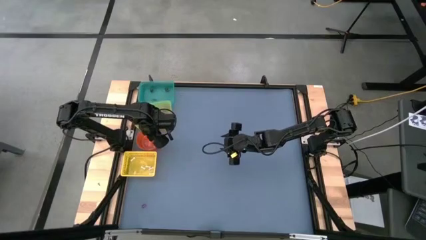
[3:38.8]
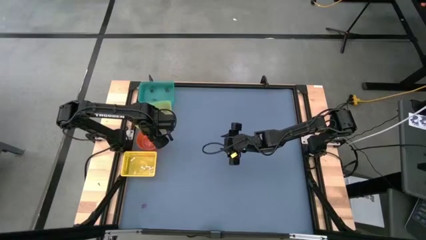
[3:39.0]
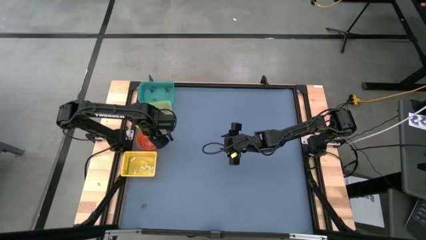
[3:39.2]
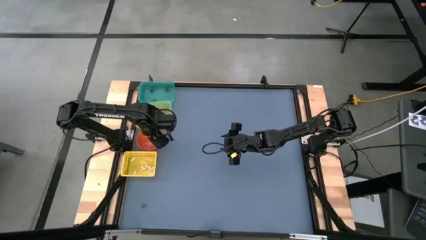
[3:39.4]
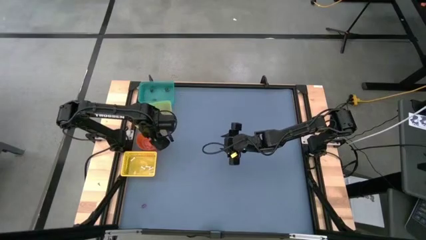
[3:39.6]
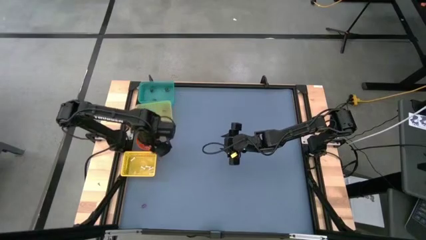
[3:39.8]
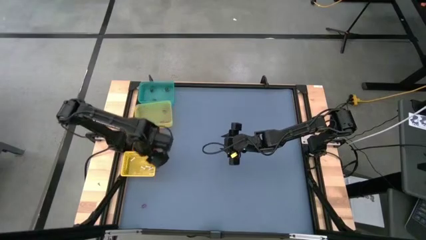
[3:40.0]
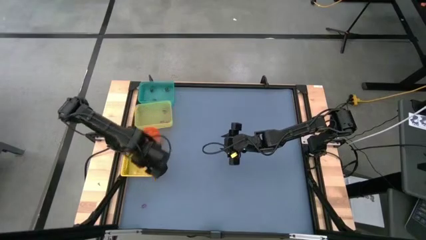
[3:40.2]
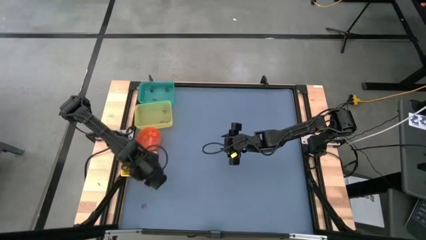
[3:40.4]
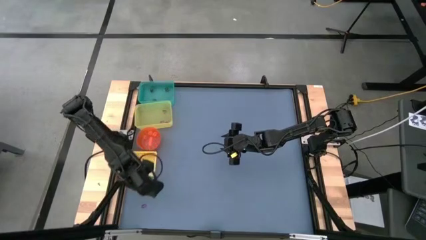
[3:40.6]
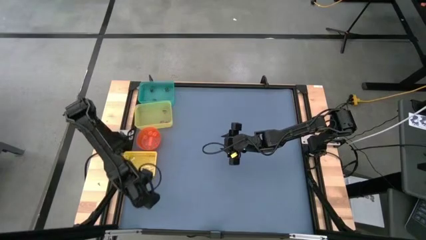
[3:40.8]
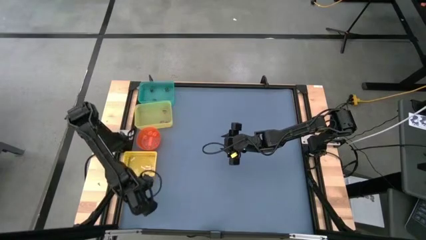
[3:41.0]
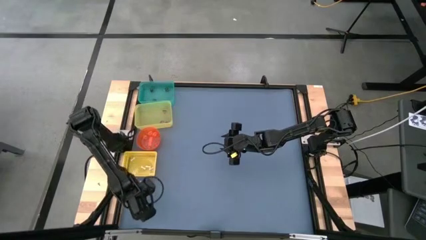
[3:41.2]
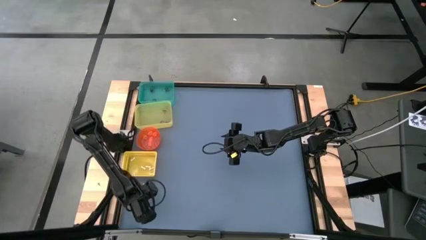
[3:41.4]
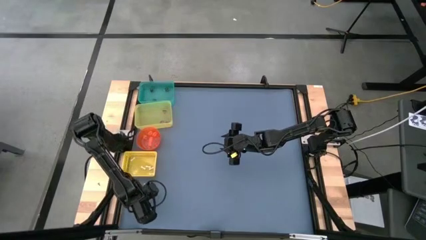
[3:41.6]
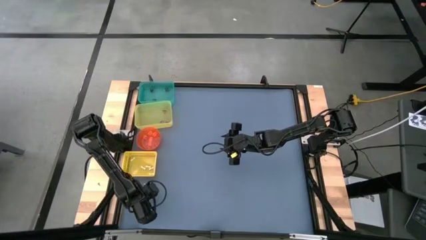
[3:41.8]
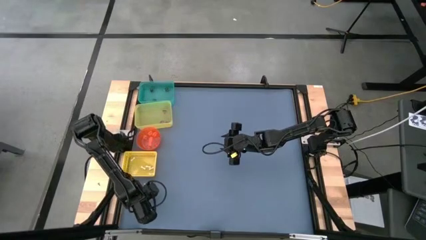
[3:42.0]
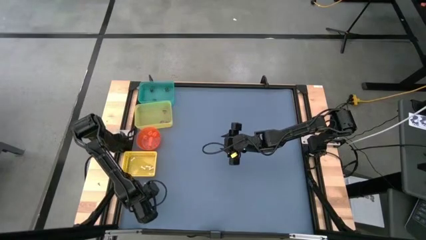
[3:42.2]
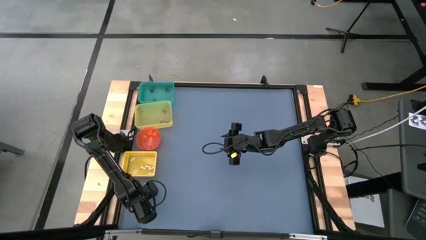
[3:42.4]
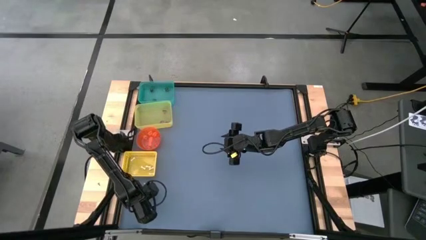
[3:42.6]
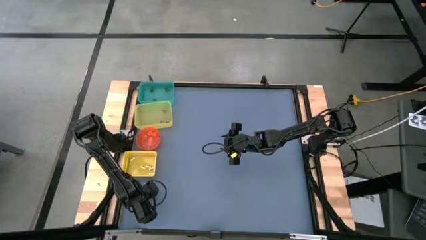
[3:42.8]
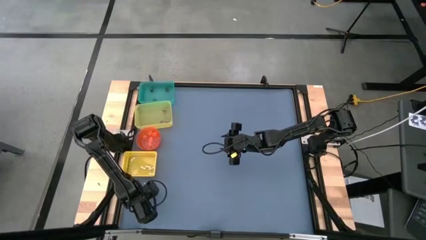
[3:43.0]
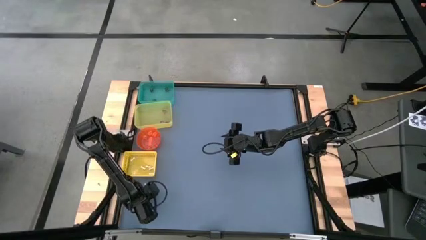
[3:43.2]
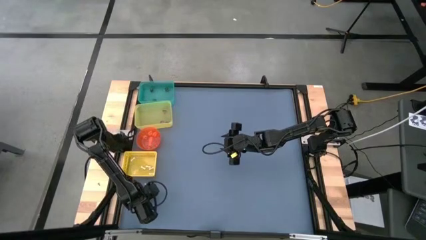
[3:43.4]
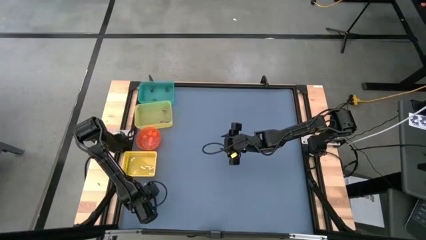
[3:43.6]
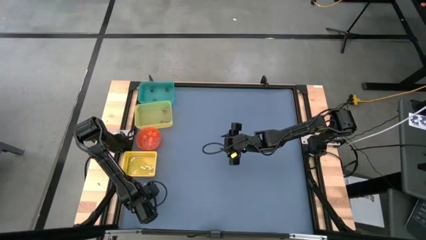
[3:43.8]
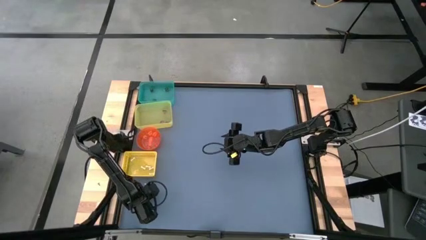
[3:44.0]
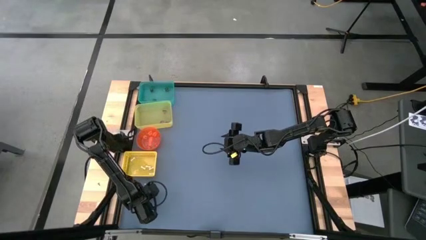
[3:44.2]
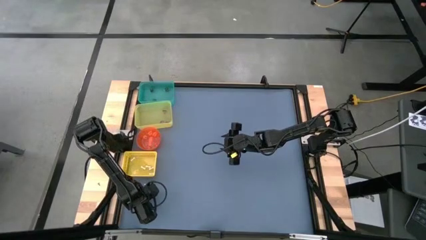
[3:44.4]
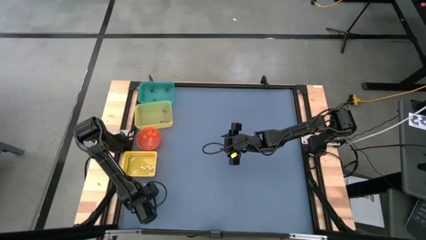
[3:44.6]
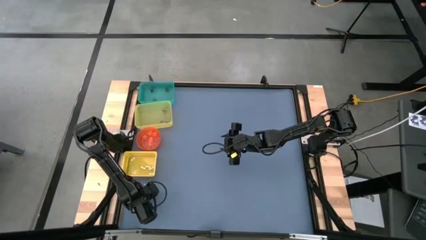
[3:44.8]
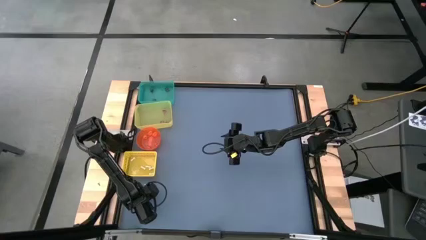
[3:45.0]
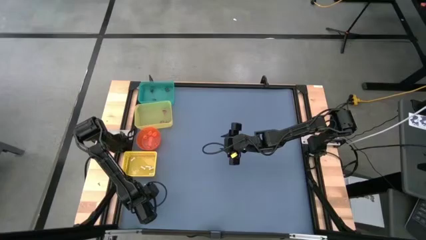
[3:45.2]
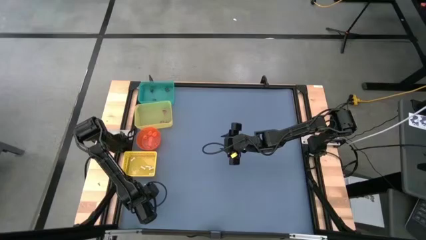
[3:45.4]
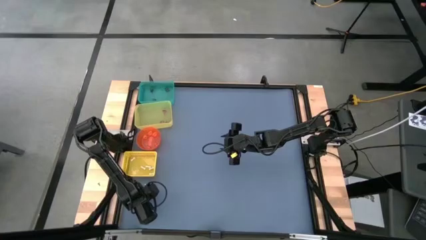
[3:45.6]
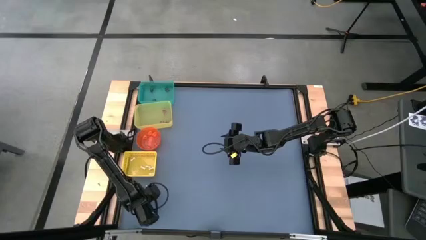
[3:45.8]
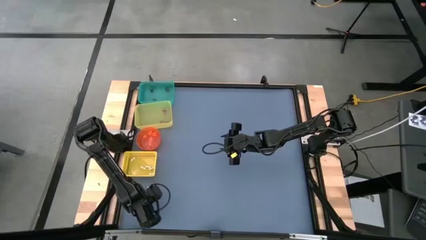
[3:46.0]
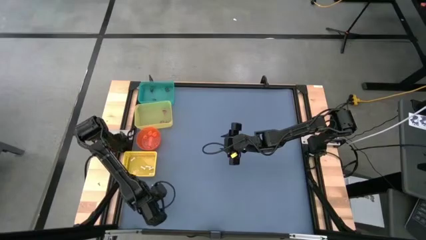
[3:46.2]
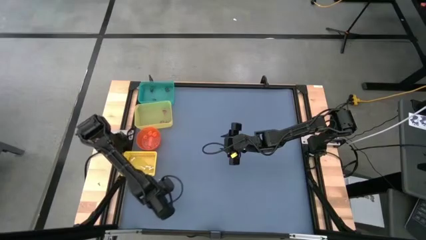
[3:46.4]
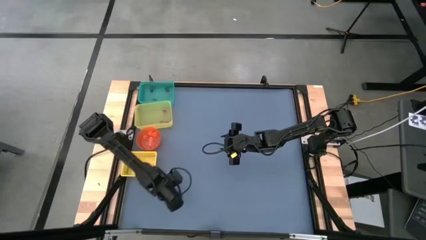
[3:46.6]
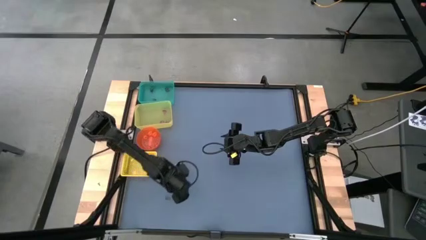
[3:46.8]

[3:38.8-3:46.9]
Task: Sort Halloween decoration
Put the purple witch hat toy into the yellow bin

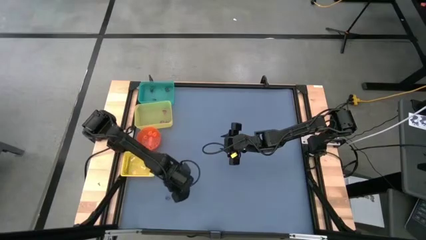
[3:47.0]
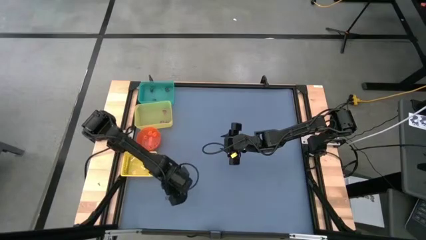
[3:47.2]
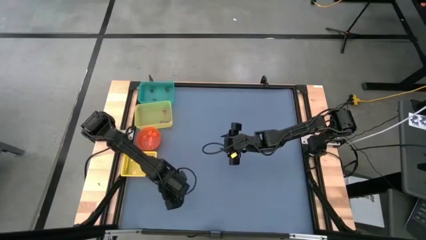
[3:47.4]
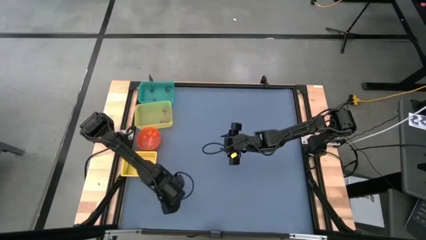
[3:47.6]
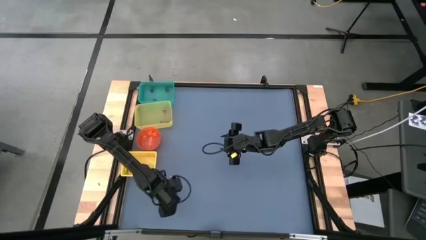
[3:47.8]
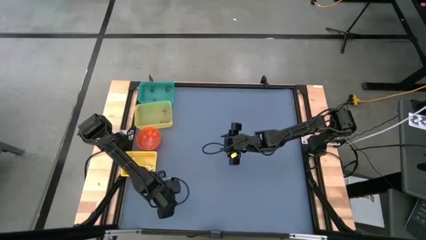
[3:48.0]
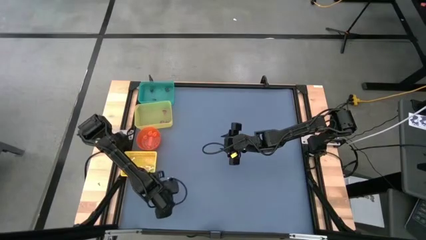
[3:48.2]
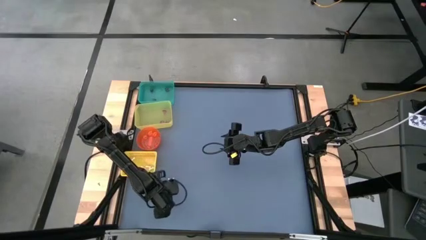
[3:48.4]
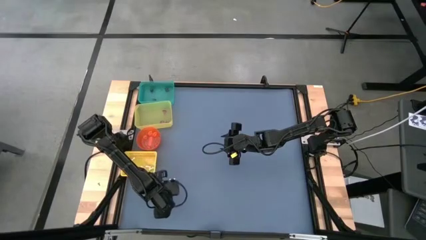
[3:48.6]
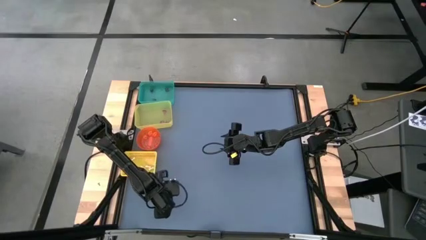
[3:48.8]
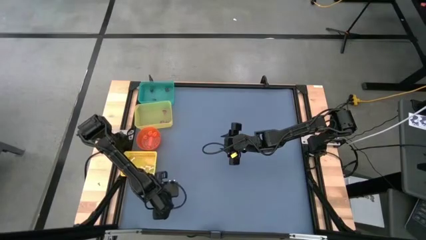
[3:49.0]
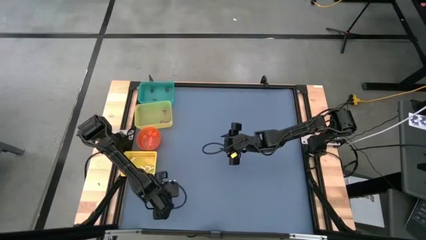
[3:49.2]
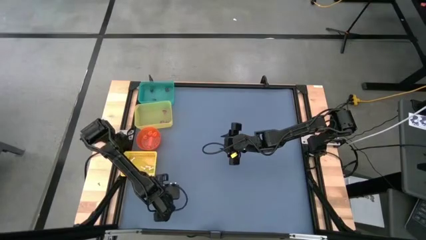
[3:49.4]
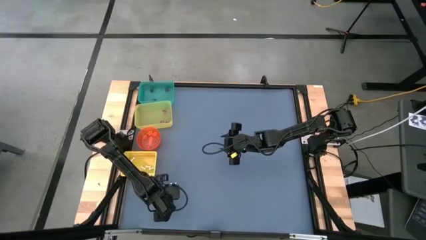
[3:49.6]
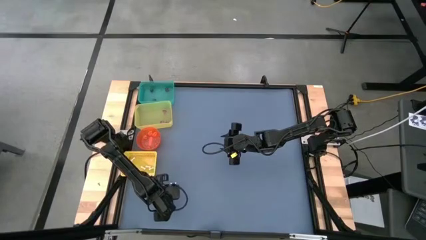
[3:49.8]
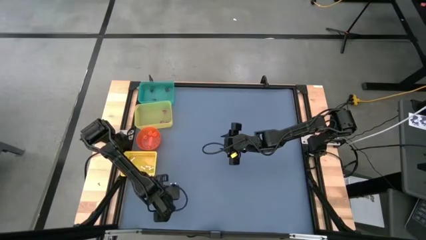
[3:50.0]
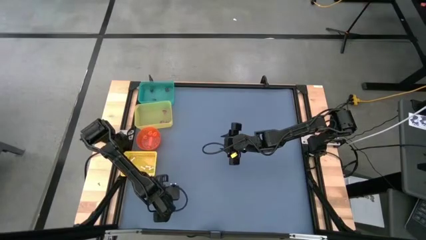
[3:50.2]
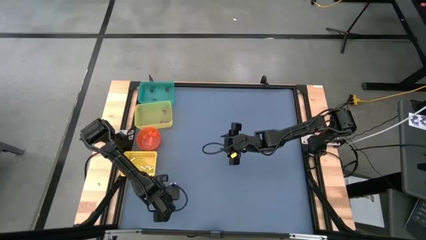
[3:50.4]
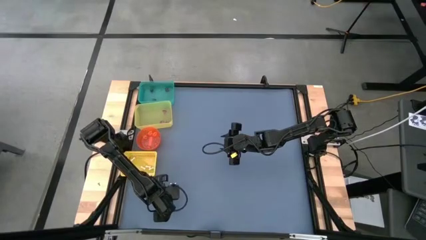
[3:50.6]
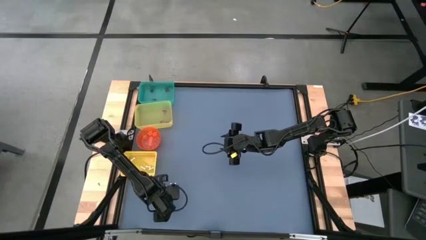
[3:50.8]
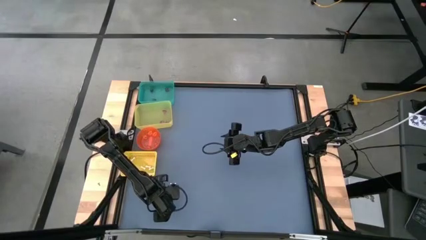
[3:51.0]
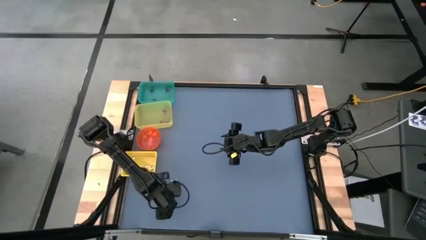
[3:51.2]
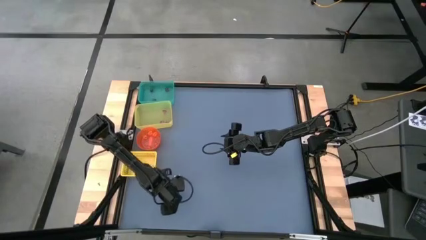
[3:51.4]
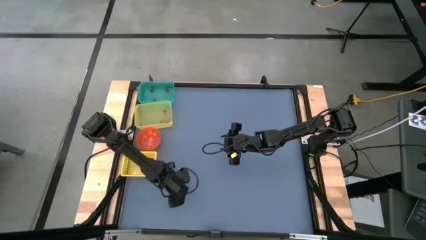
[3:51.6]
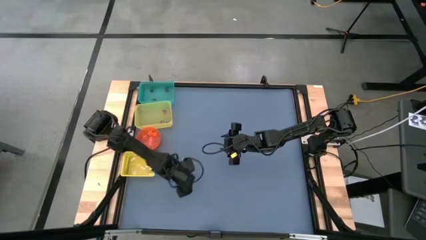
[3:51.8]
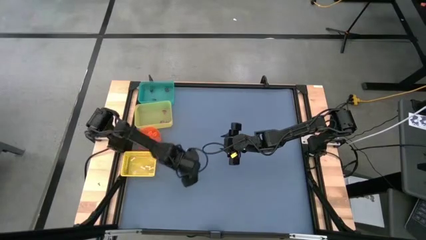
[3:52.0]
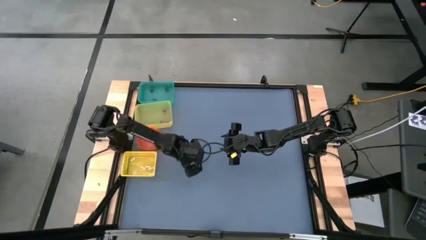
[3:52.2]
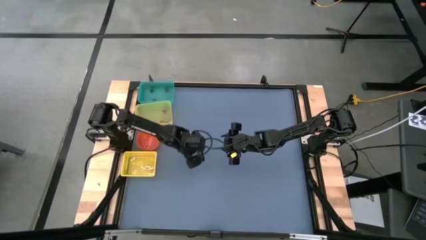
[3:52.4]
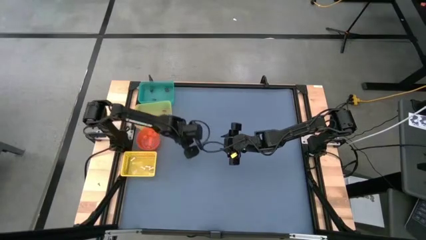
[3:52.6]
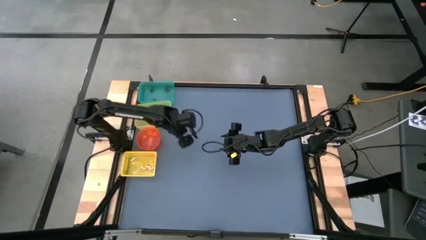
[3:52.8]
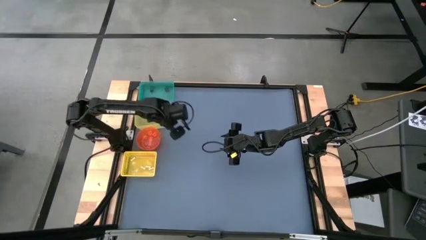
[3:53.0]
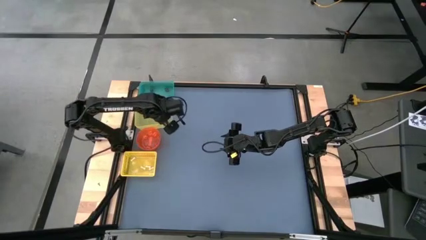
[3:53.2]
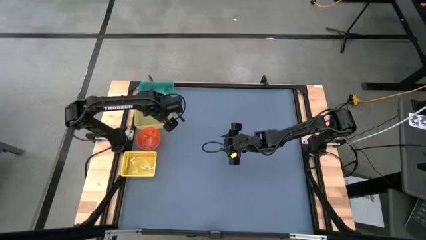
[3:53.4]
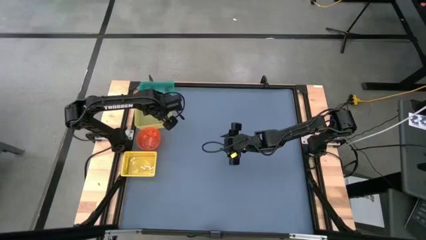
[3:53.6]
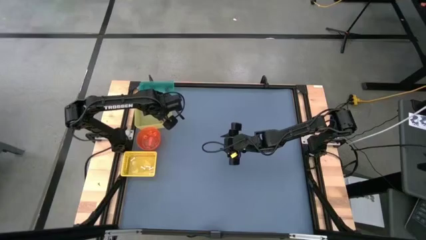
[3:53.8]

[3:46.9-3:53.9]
Put the purple witch hat toy into the yellow bin

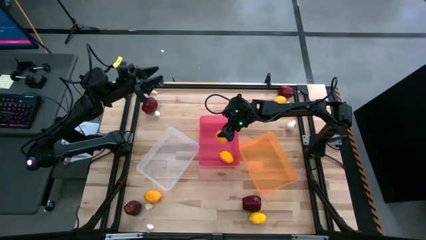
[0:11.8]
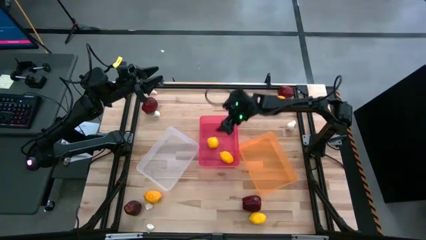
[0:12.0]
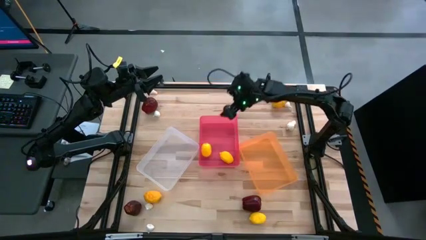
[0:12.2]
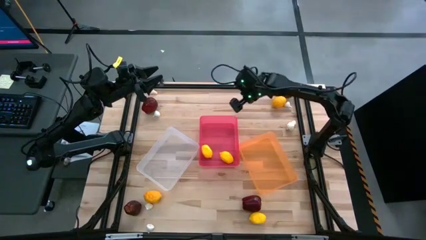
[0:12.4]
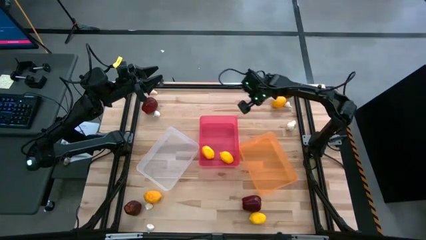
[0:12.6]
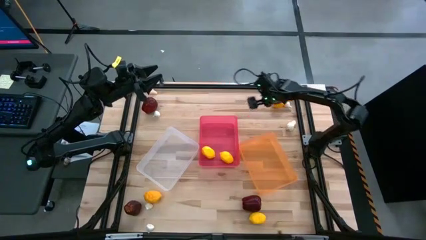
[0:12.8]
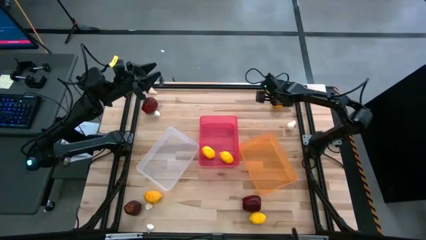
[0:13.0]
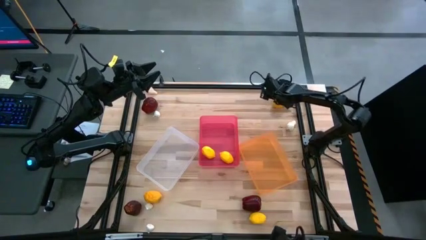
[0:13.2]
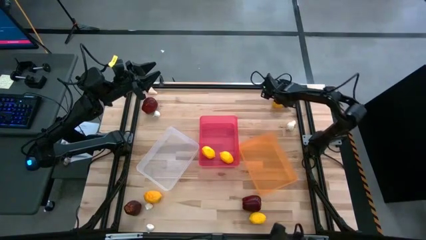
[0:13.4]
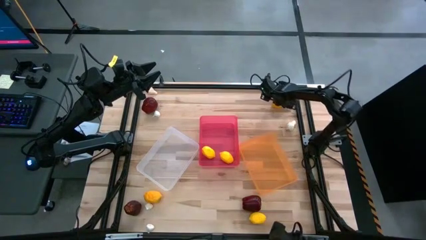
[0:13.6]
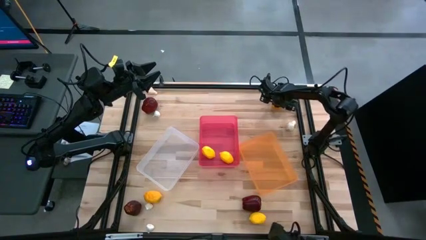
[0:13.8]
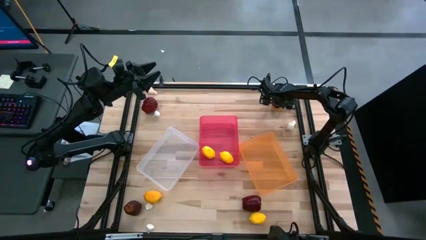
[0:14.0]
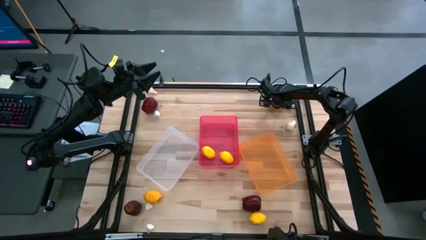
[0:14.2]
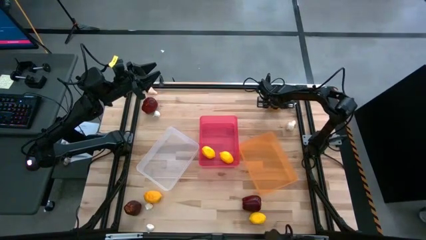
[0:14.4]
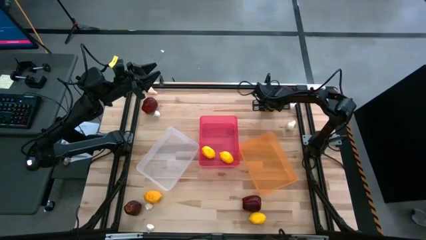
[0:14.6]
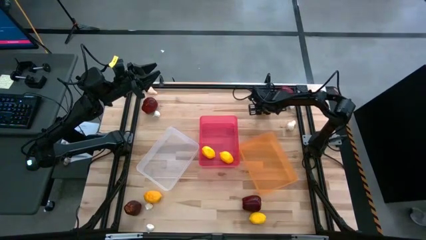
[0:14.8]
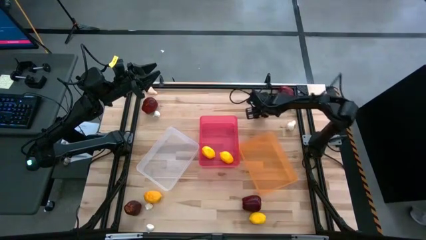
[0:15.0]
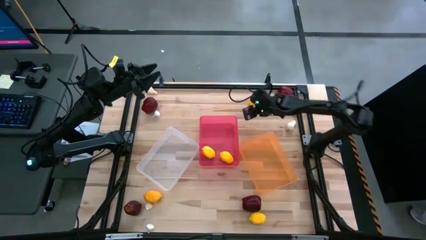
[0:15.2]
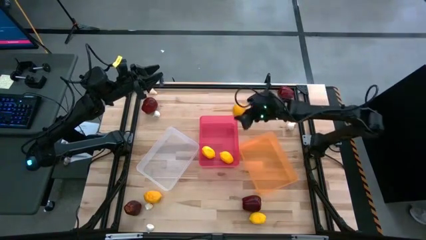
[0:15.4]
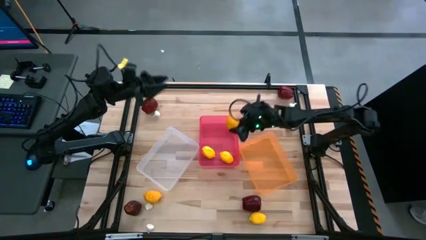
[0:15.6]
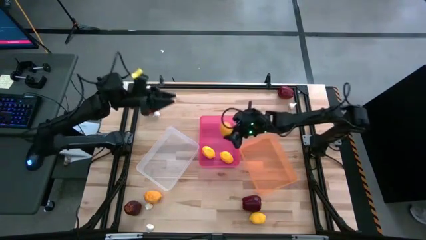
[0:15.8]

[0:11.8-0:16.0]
Task: Sort produce into baskets
Put the yellow lemon into the red bin
